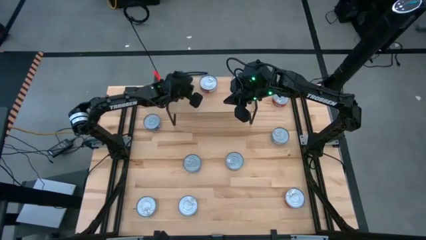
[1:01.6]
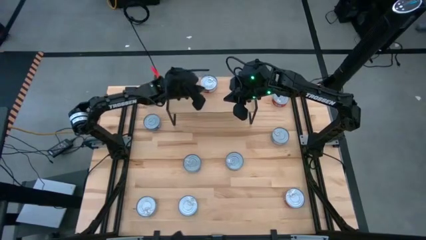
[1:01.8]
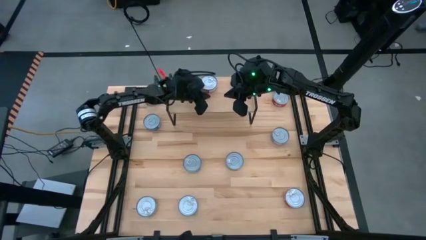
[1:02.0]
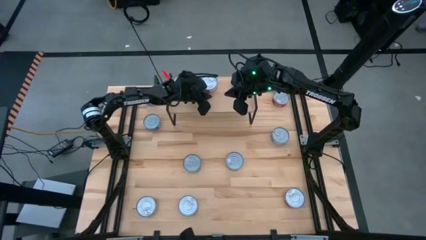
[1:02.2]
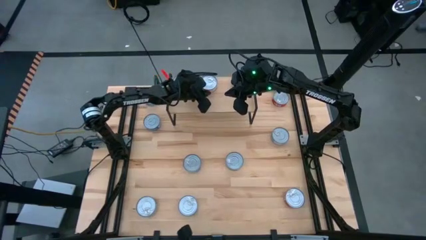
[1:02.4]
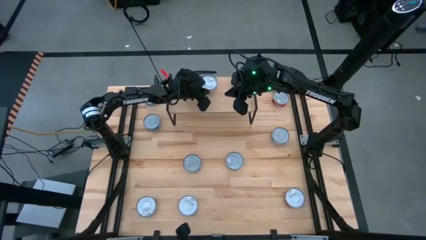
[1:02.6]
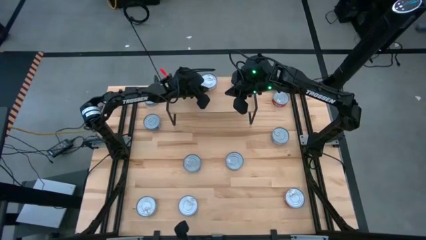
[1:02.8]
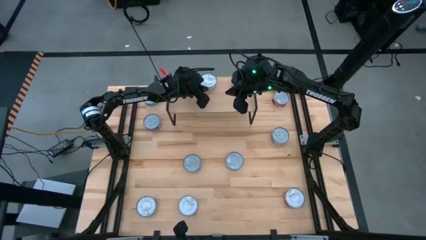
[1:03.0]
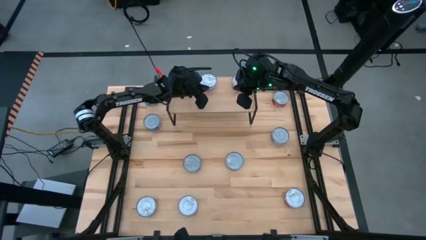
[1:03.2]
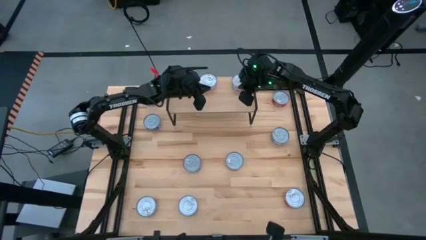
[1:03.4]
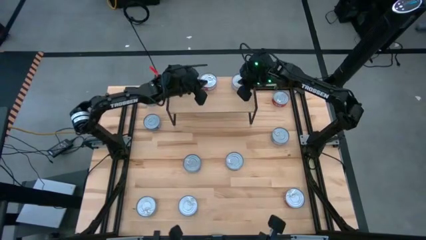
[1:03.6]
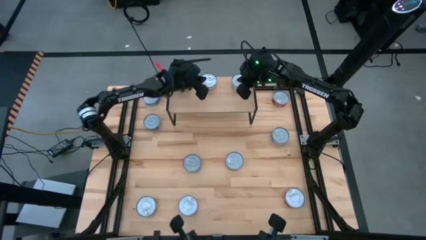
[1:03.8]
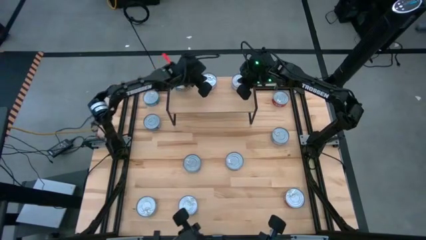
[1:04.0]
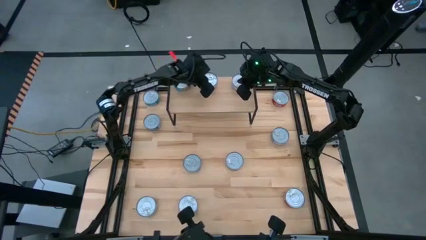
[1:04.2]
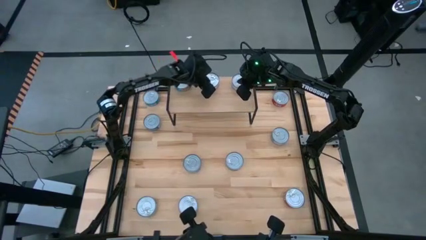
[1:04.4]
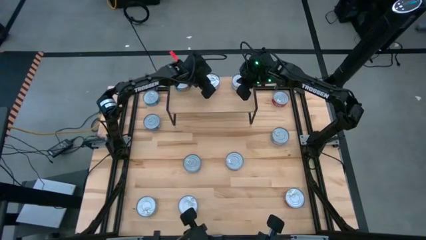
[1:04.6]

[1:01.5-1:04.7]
Task: Stack canned seafood by type on shelf
Adjust the red tuna can on the shelf

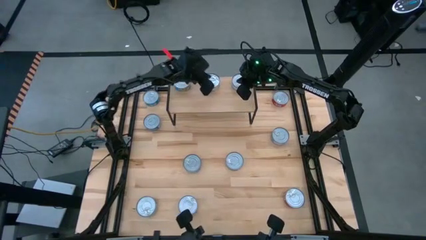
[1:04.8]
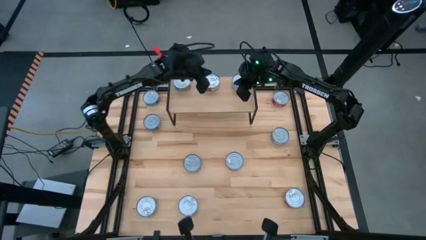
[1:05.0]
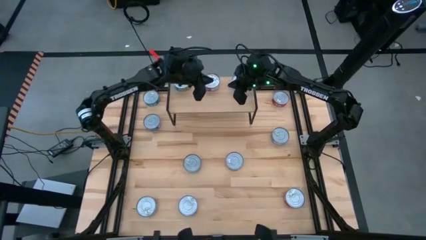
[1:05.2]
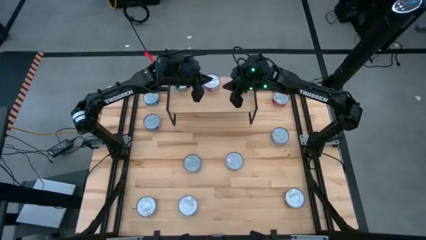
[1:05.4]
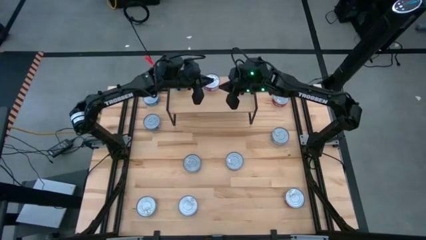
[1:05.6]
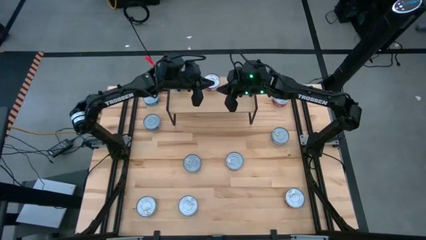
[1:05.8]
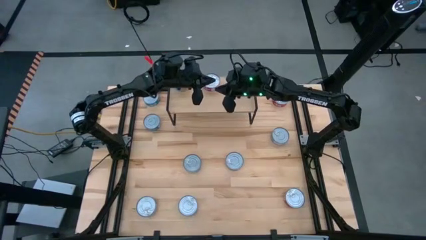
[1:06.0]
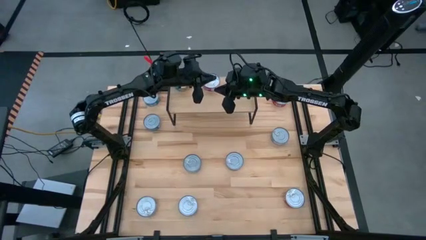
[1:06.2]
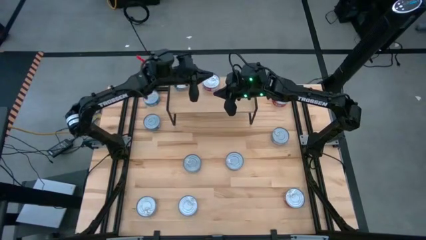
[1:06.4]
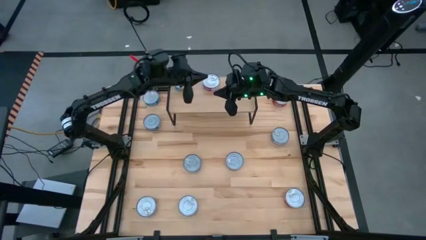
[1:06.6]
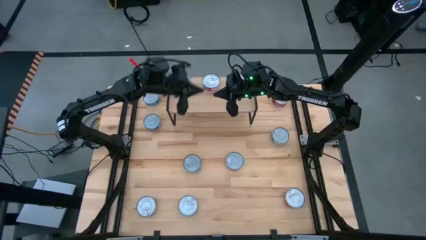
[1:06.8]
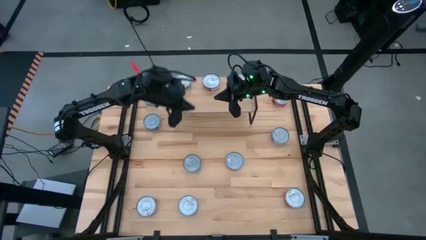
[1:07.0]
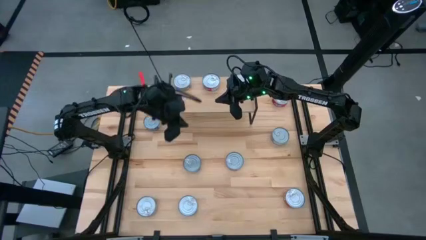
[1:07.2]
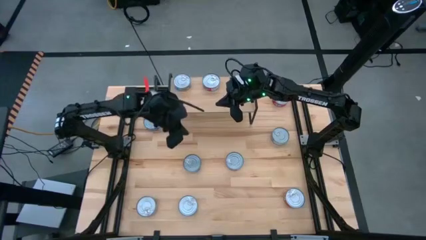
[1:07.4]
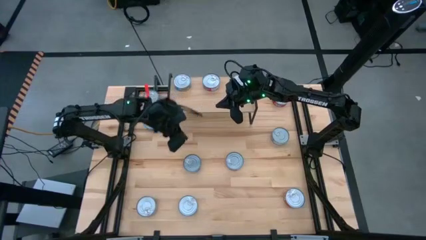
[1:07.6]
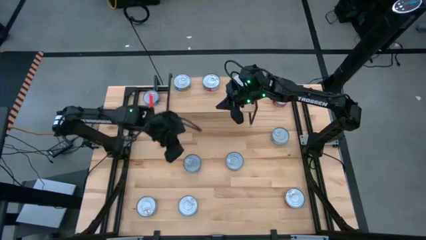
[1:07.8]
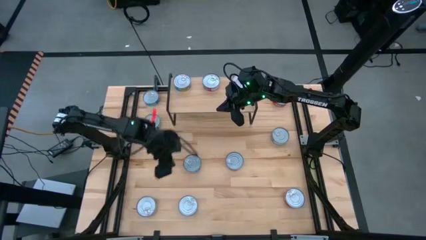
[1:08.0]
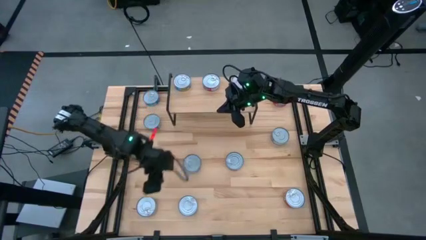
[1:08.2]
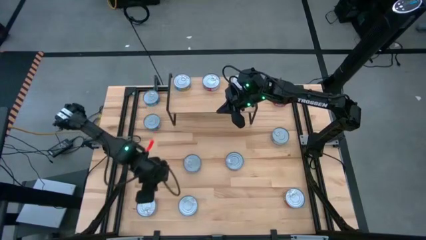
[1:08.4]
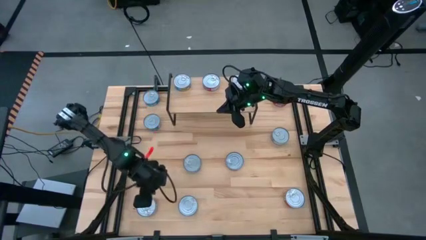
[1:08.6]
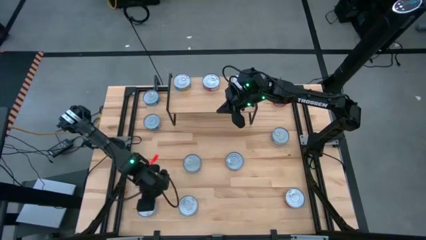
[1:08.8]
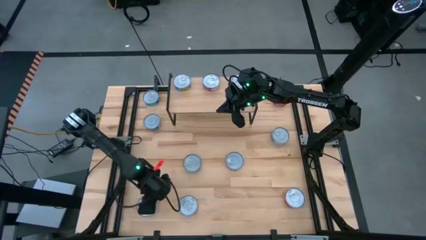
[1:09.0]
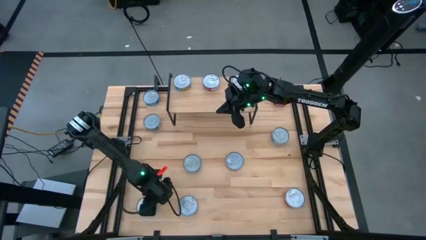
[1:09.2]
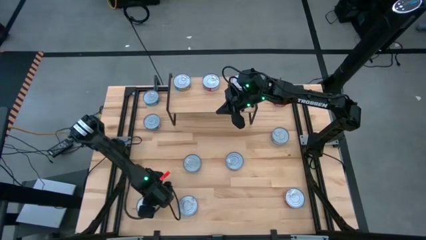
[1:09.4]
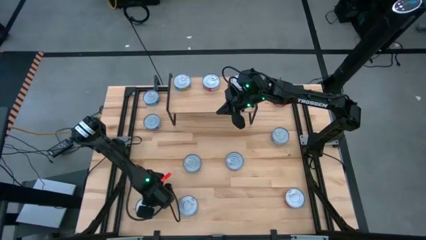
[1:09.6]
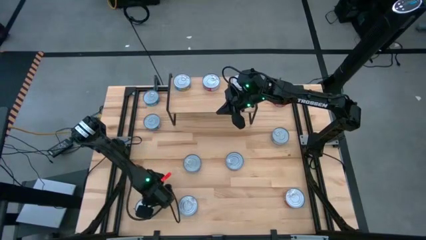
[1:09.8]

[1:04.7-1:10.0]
Put the bottom left blue tuna can on the shelf

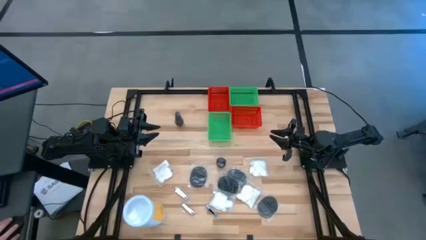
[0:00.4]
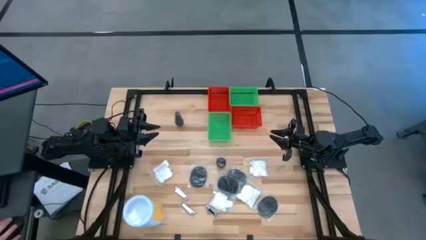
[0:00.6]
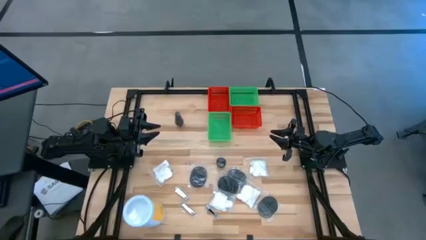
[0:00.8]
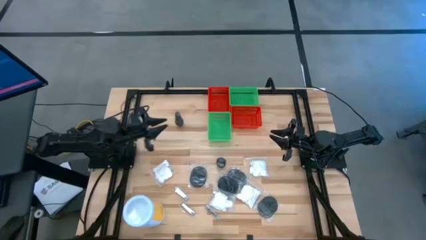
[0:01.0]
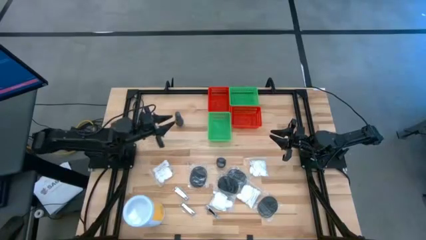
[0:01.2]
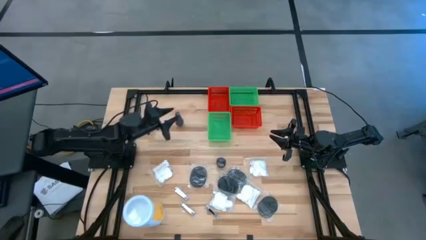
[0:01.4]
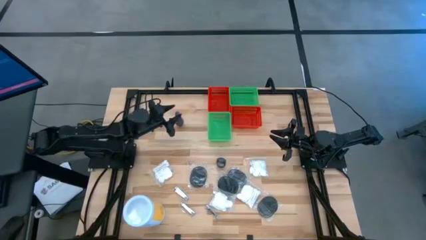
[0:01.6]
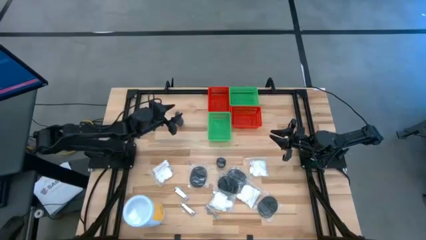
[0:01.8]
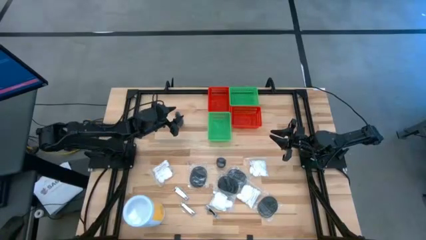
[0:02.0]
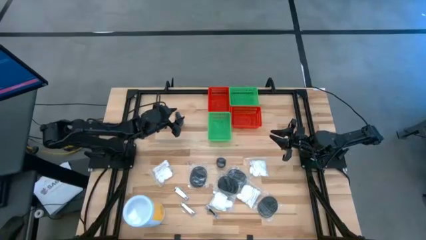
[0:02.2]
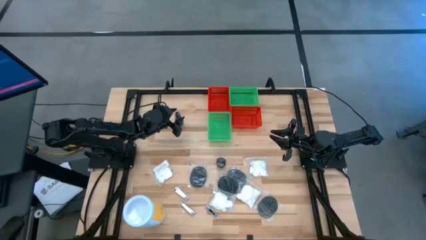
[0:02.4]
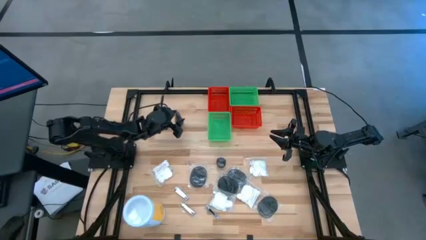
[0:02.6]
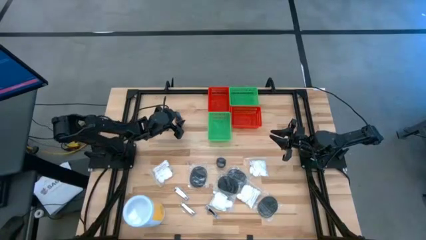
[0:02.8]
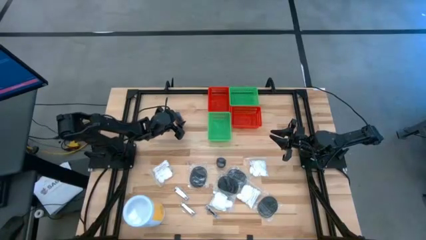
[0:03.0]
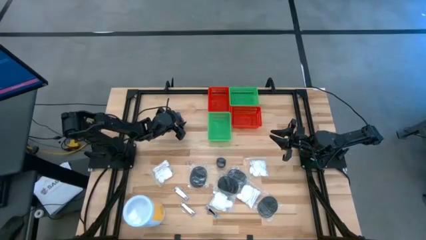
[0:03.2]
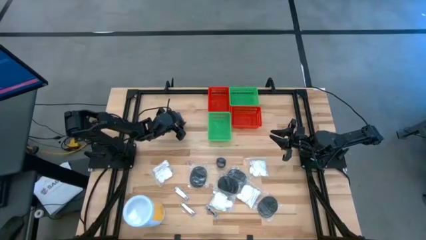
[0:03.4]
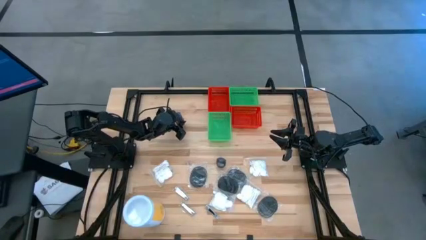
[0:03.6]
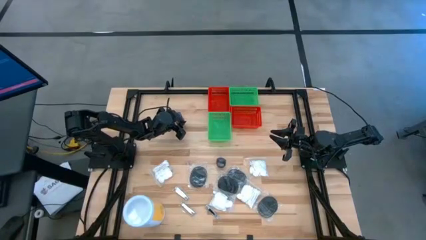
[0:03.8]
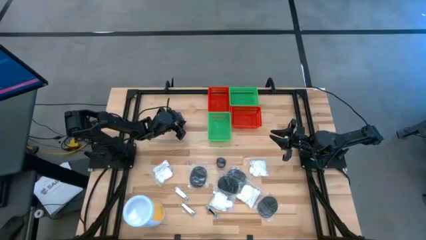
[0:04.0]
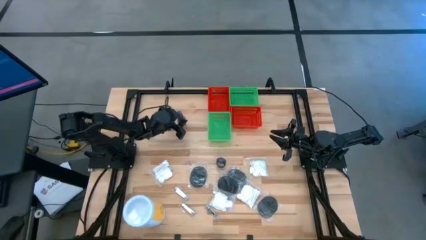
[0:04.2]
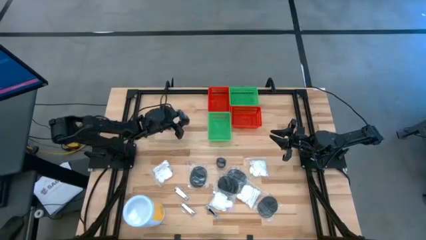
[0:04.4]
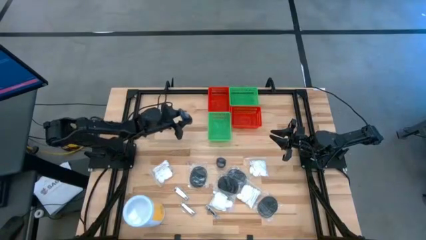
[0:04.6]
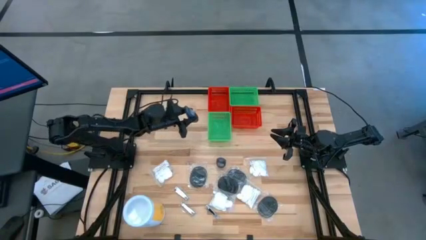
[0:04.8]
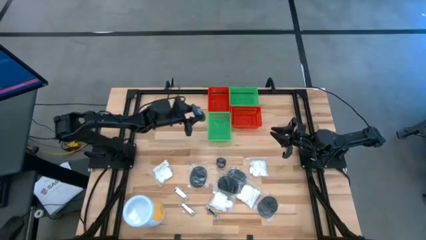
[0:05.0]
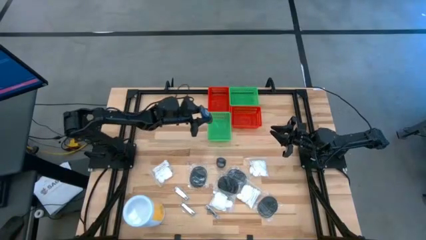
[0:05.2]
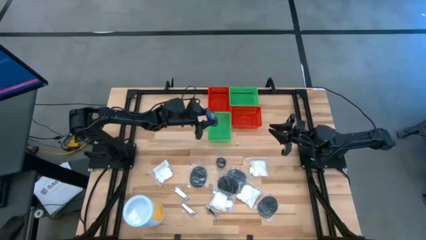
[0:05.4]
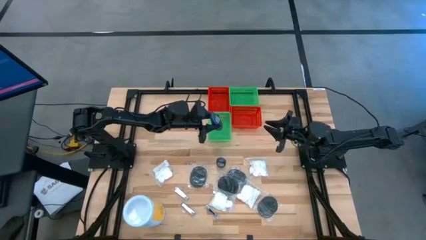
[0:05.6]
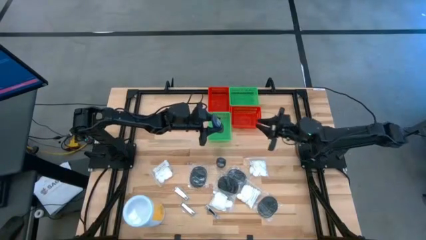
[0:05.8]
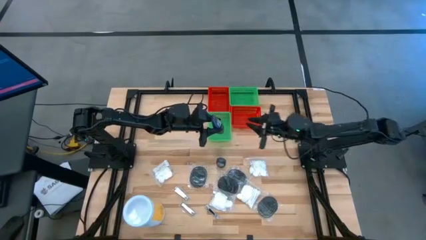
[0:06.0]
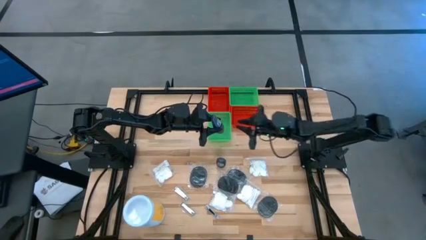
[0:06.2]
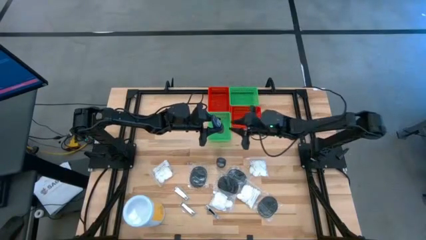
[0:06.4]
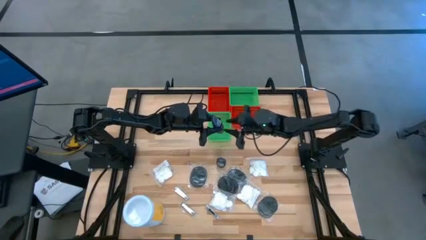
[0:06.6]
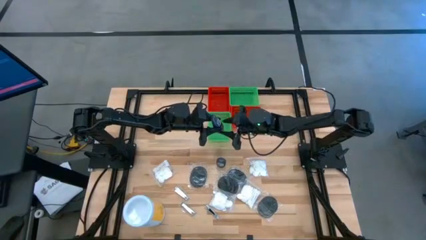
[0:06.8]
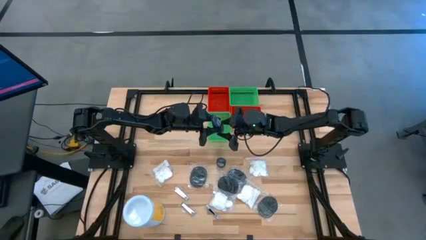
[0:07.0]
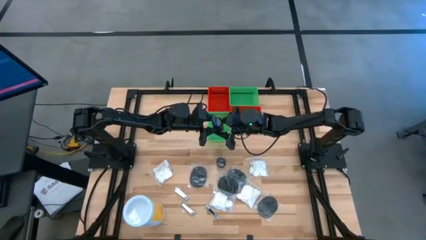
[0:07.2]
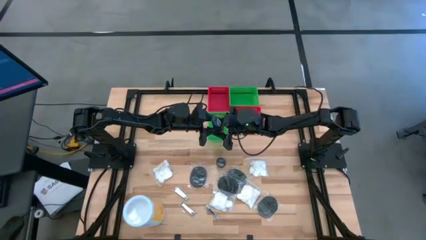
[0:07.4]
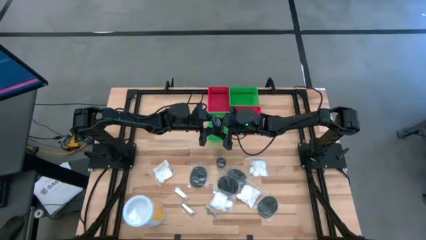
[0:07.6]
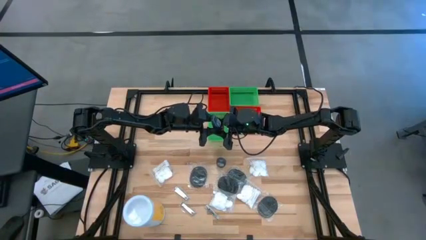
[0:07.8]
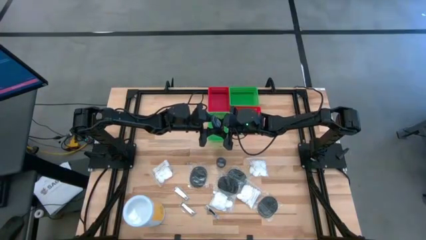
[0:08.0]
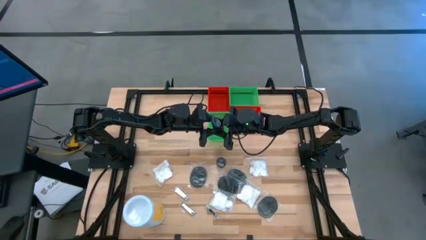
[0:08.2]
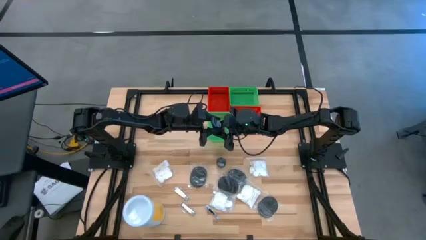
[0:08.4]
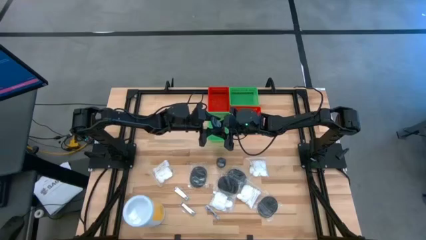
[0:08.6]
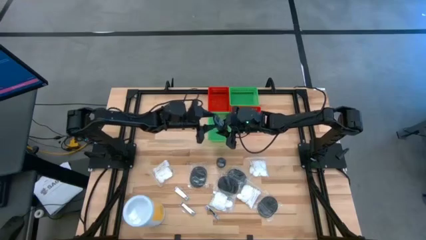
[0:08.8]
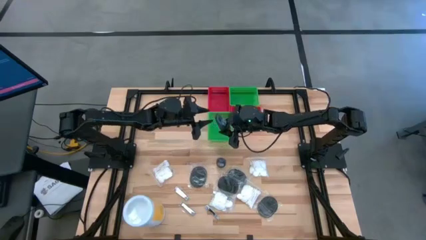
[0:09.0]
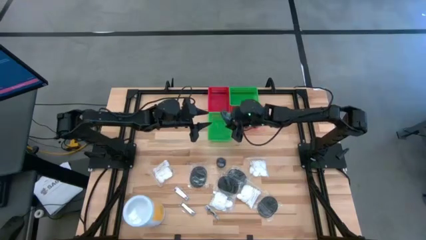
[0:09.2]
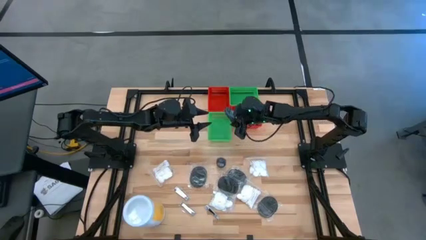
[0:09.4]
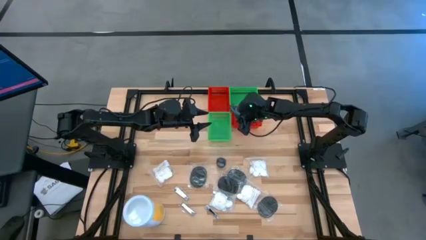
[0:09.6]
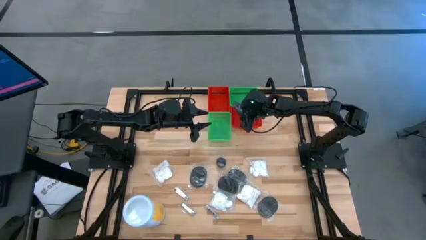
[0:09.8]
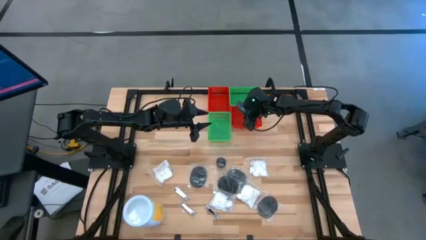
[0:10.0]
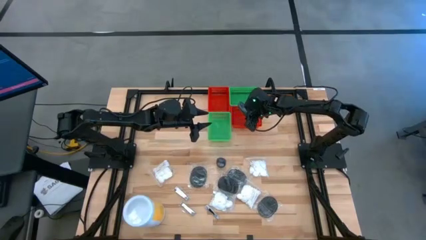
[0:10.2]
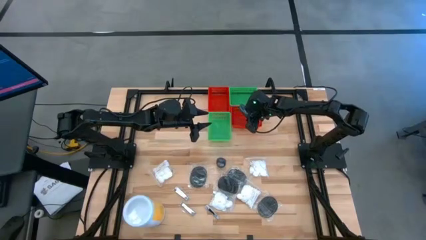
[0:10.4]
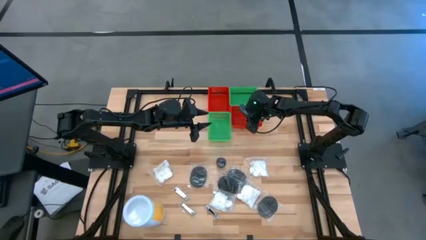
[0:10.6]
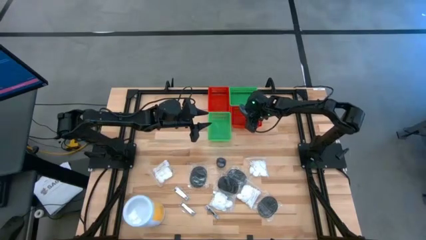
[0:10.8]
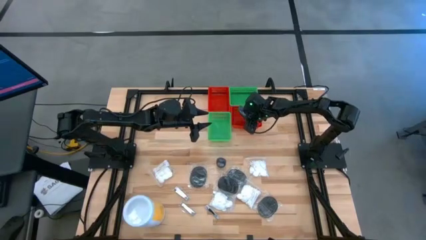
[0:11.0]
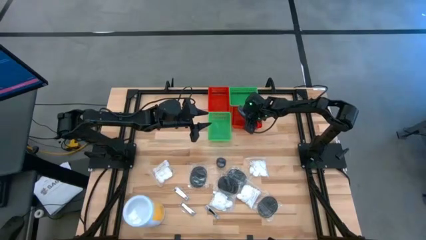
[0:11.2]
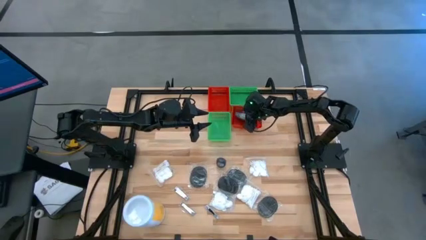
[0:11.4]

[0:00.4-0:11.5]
Task: Pick & Place Travel size toiletries
Put the deodorant into the right red bin
